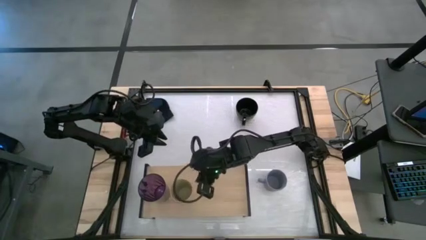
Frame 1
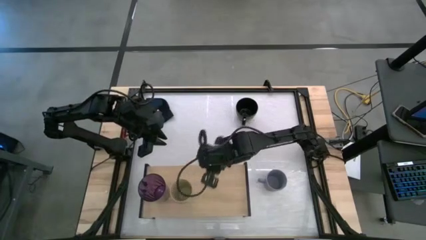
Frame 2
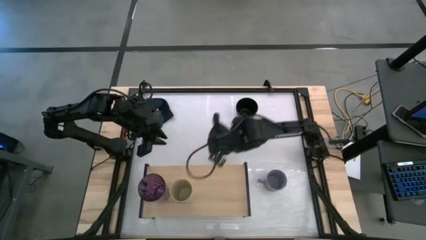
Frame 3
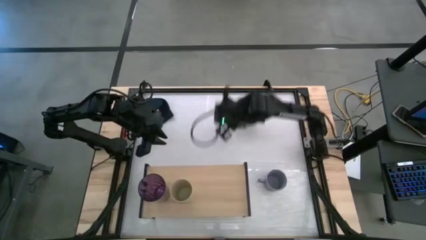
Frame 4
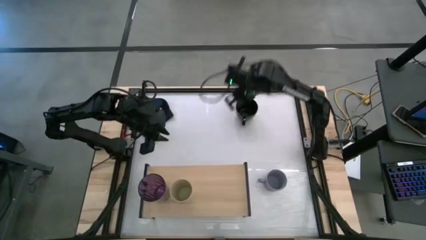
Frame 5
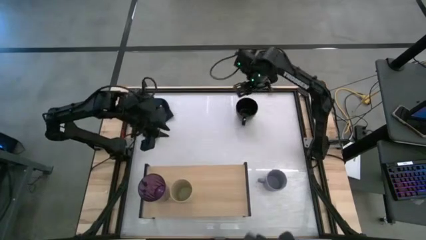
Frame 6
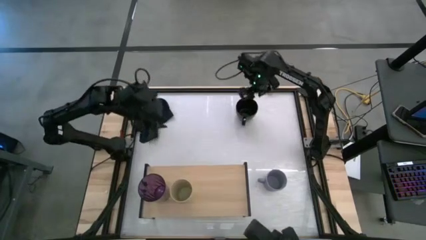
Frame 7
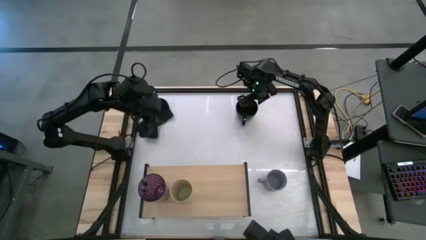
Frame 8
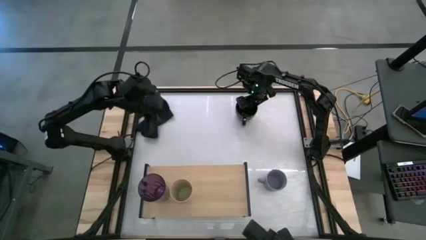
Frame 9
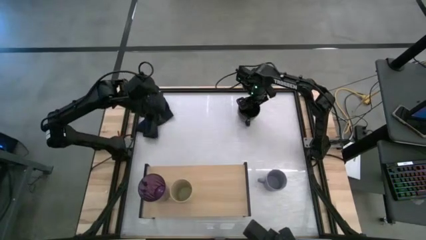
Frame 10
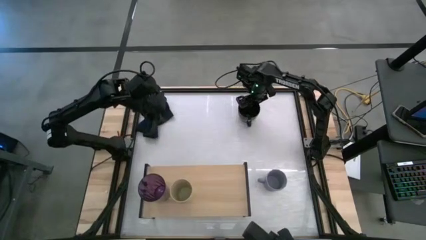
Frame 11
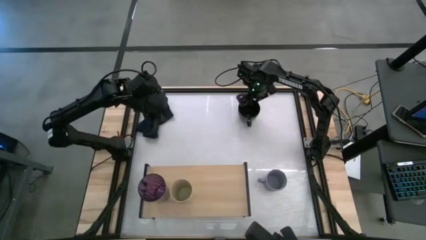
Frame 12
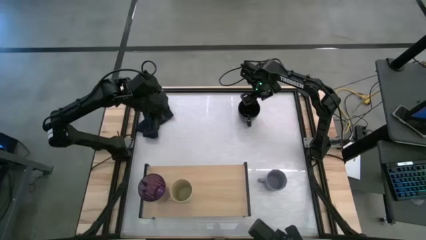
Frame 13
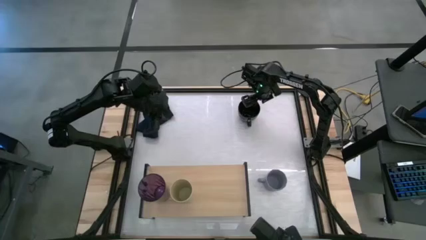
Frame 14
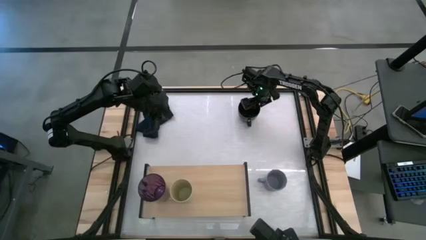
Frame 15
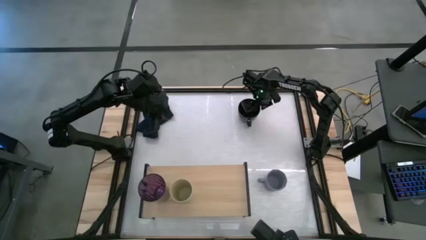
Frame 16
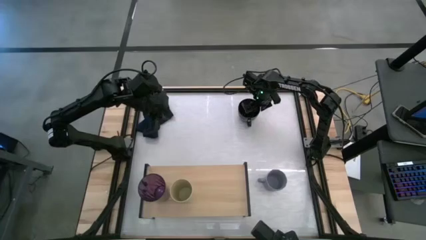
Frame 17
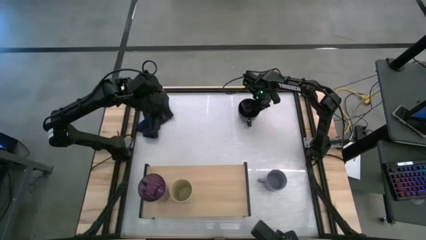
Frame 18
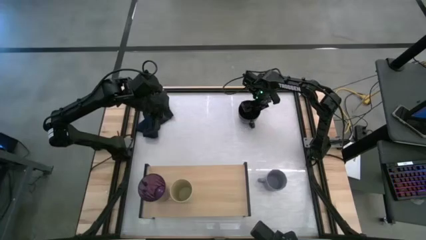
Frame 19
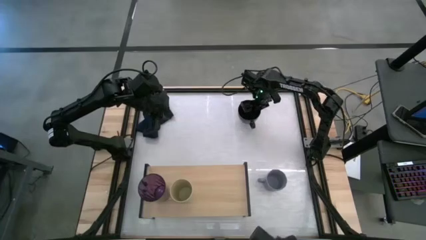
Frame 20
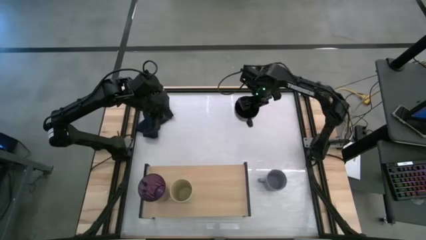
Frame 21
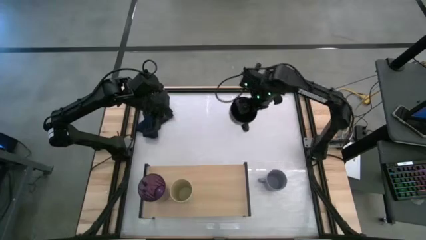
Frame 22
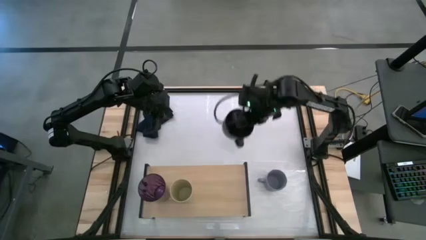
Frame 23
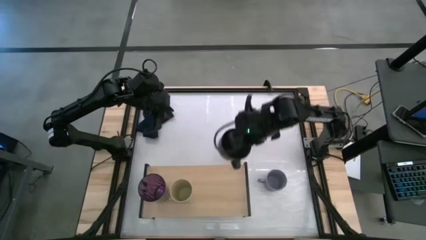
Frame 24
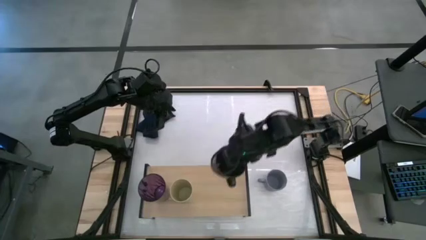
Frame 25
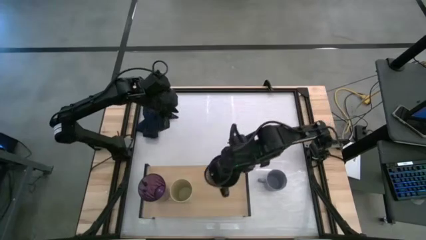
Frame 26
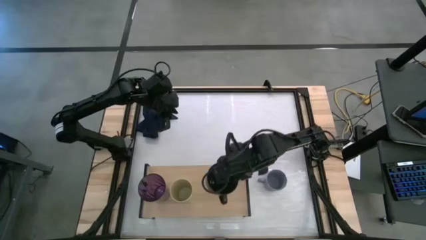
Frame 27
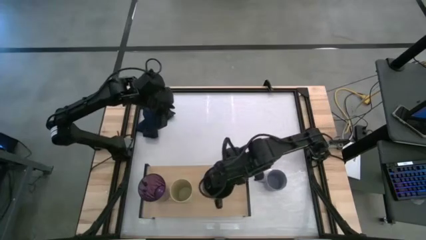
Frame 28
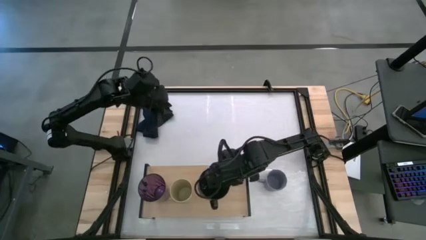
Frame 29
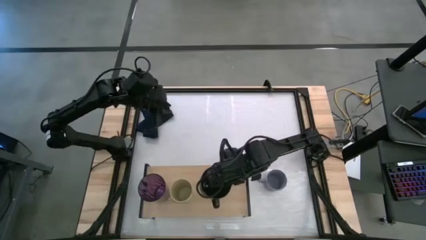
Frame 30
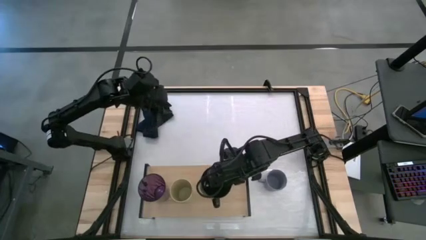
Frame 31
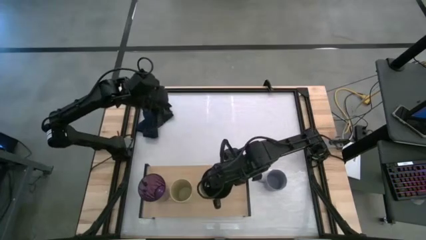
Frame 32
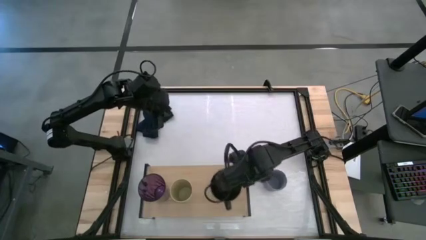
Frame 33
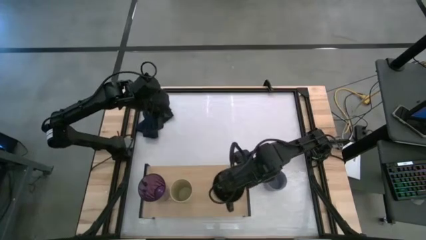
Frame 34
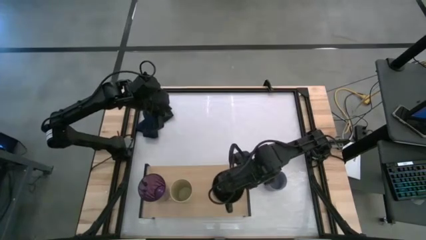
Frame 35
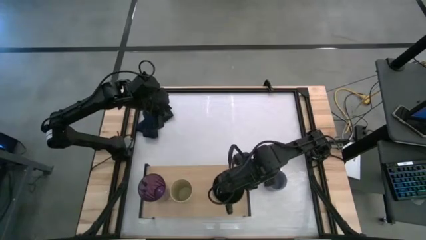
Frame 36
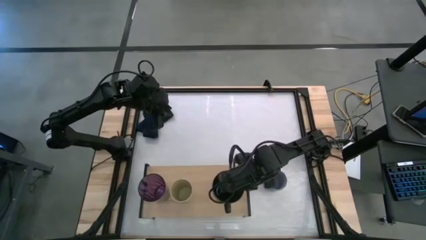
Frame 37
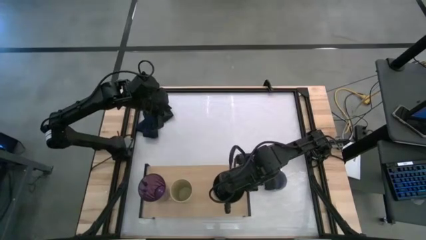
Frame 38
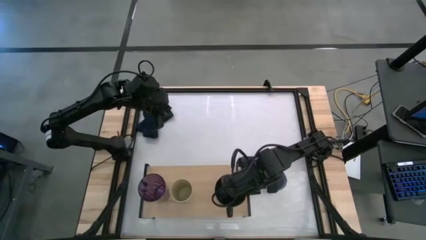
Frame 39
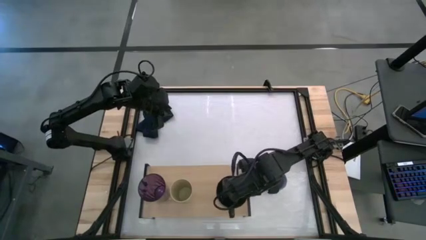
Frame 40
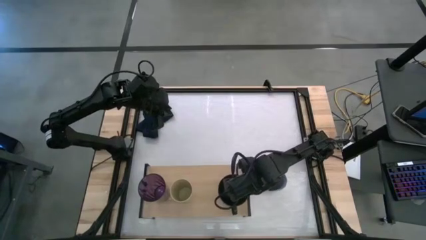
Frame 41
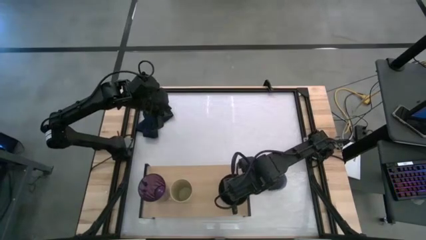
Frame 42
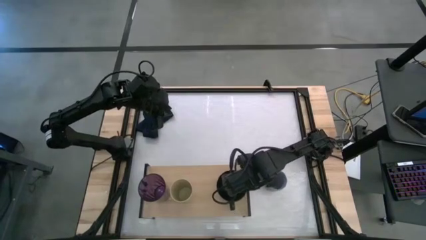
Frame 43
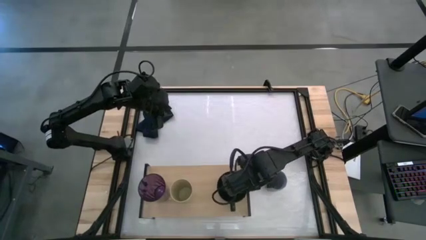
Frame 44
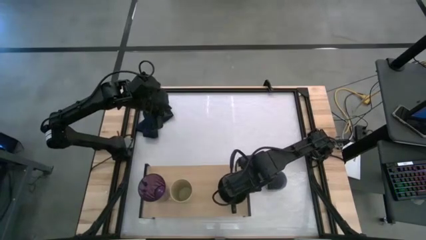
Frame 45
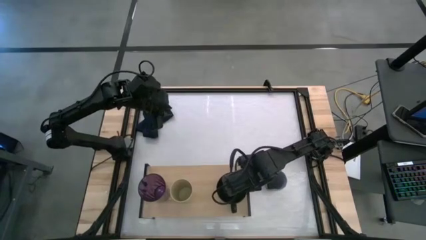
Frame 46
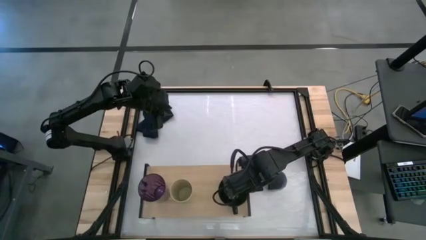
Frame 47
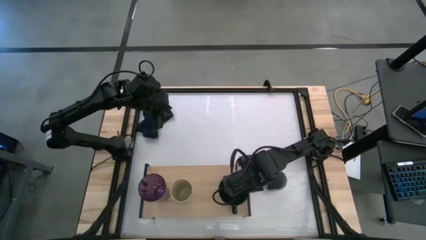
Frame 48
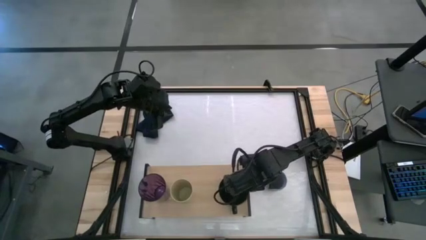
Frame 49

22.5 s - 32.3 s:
Task: Stack small to large cups/mugs on shelf
Put the black mug on the shelf

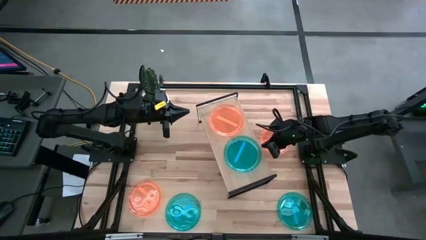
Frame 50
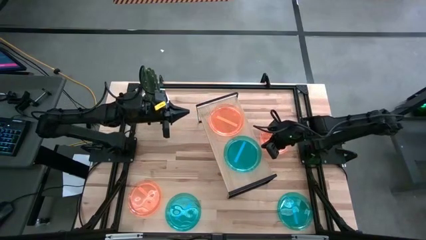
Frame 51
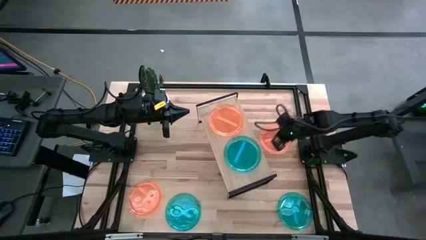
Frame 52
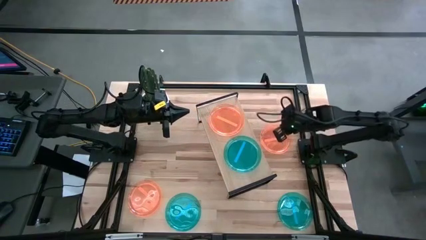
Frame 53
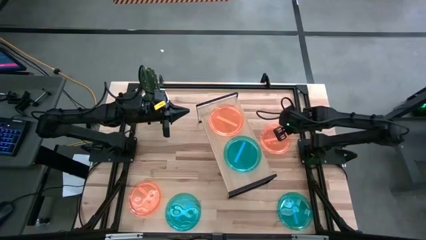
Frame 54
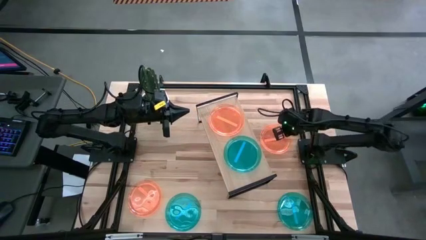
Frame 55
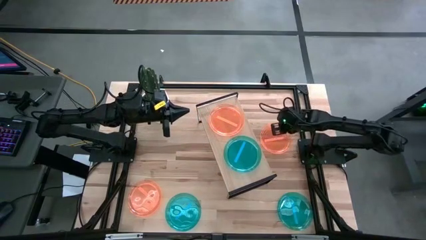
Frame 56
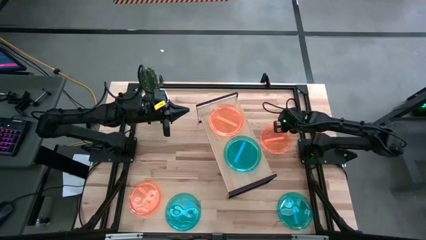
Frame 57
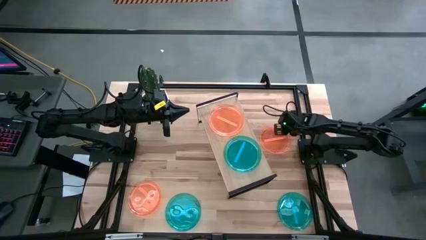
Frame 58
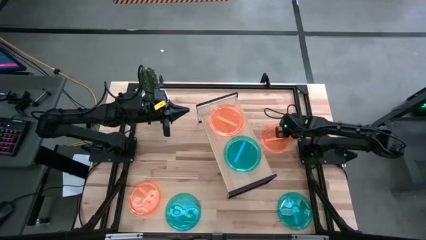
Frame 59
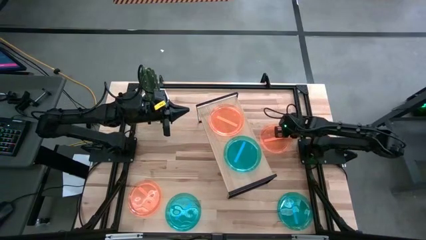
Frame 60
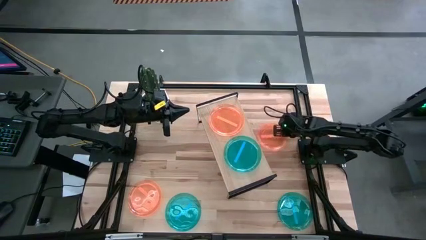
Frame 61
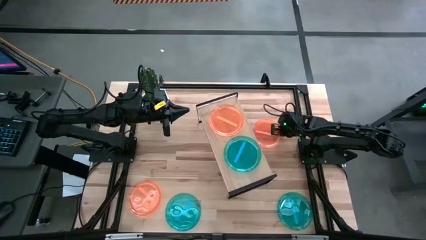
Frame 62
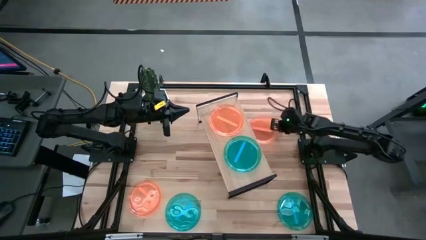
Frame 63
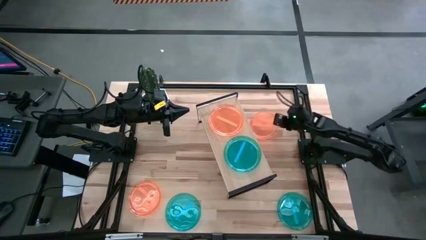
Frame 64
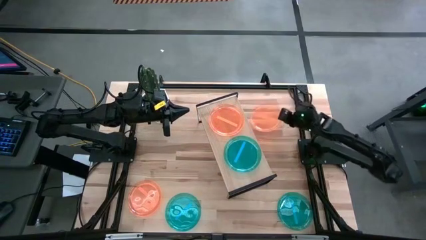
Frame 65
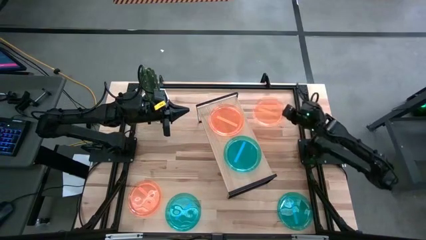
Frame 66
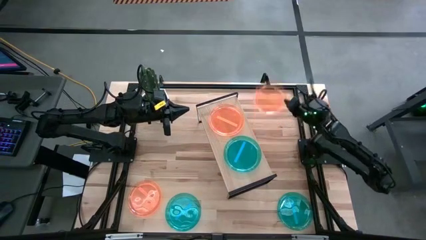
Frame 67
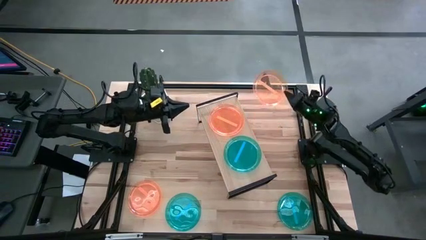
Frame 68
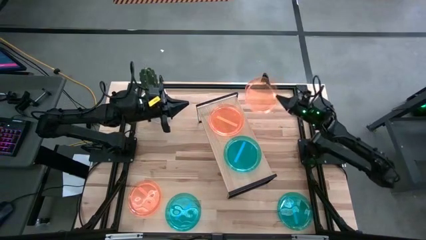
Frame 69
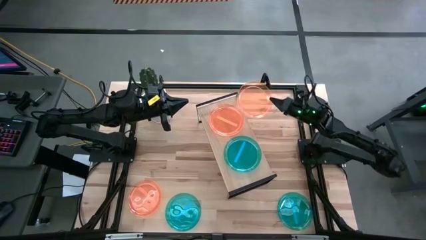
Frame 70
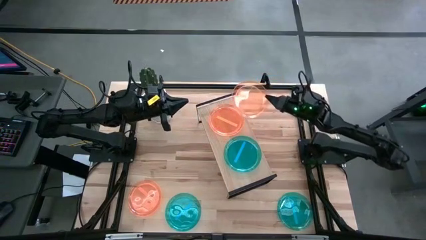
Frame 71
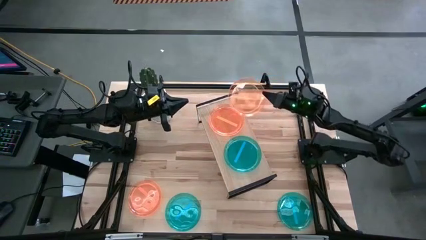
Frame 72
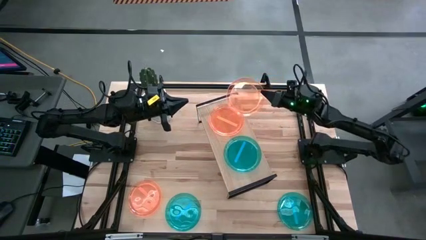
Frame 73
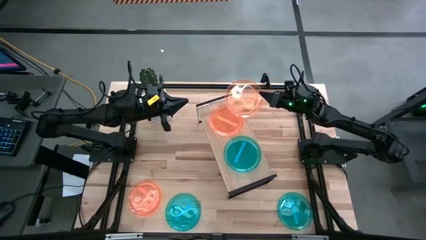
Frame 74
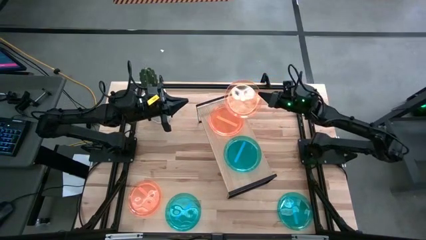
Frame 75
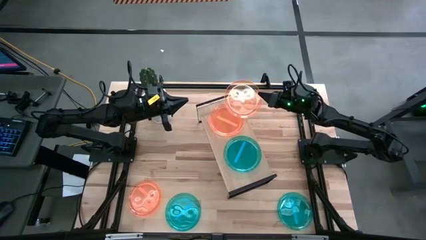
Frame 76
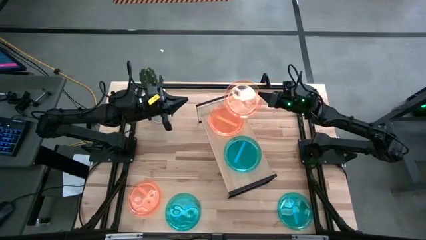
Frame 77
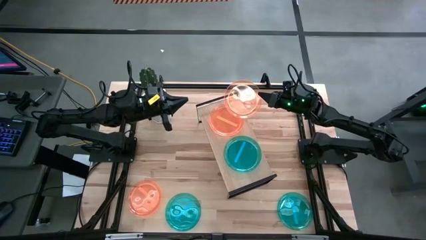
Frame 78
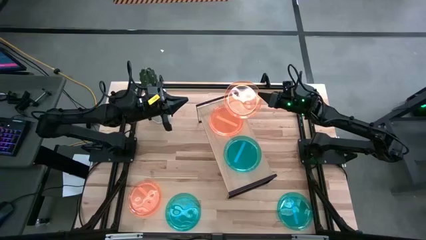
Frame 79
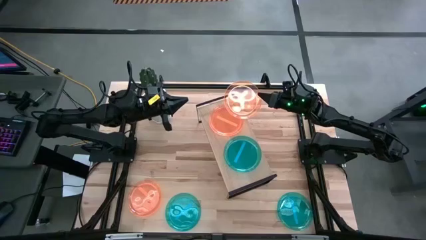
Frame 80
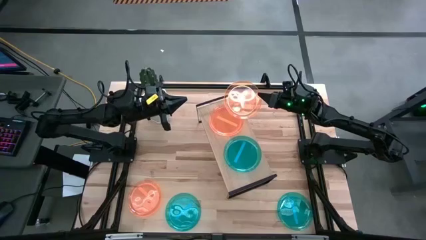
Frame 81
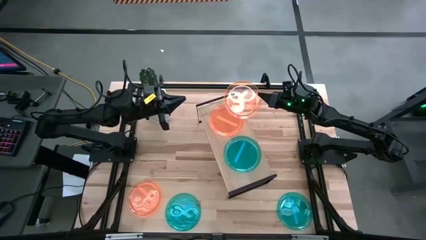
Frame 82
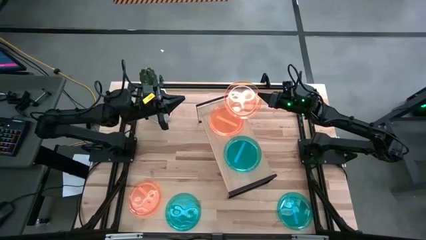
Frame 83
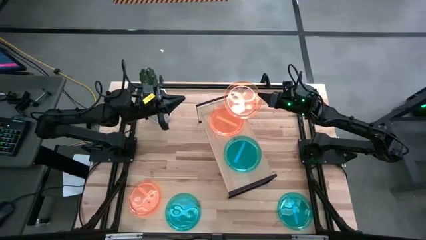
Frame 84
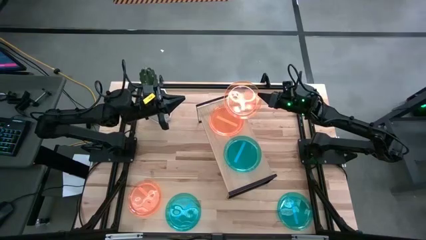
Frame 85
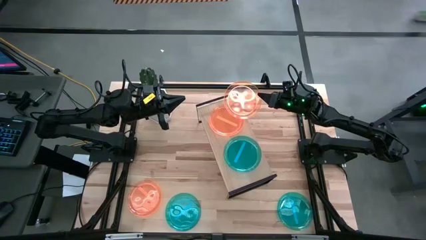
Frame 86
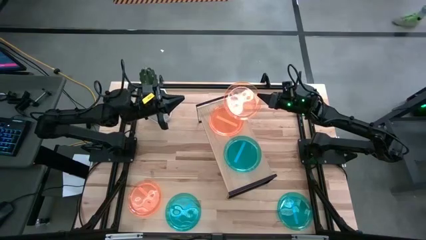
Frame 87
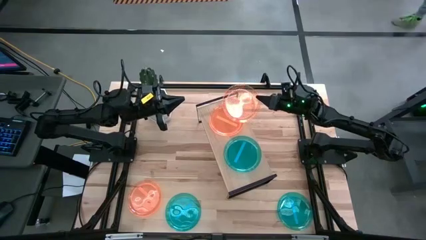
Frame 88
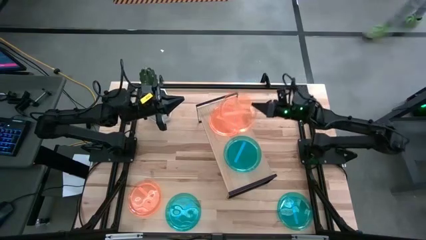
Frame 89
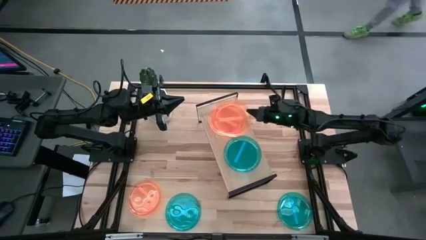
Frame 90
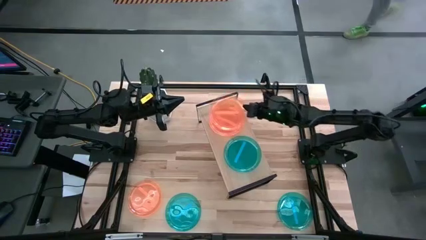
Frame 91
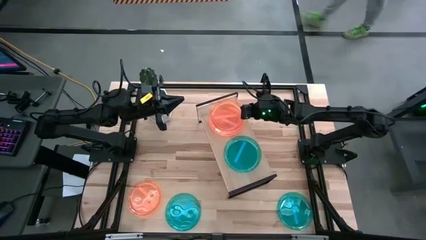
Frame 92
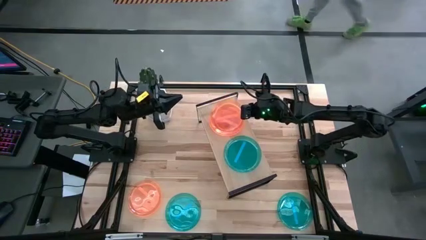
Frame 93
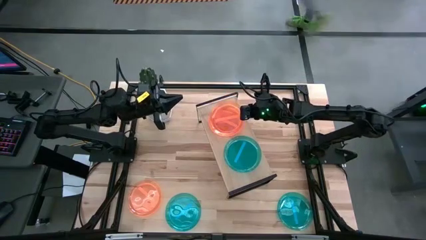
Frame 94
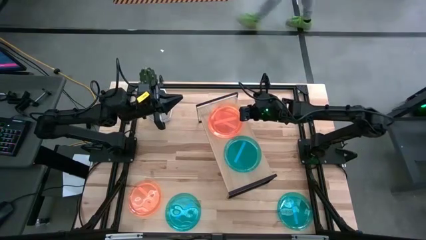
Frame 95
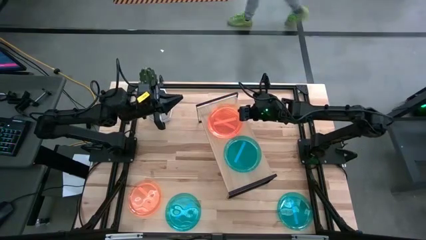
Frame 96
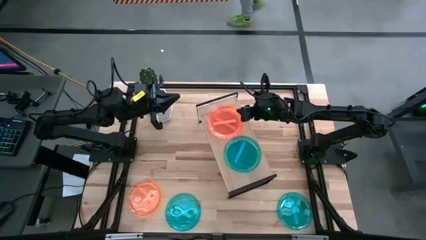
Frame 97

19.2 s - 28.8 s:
Task: Place and stack plates onto a shelf
Stack the top orange plate on top of the orange plate on the shelf
